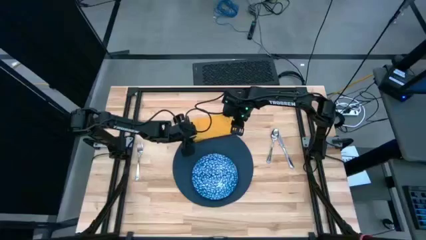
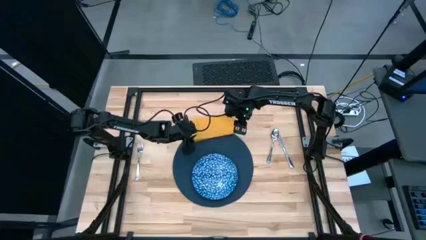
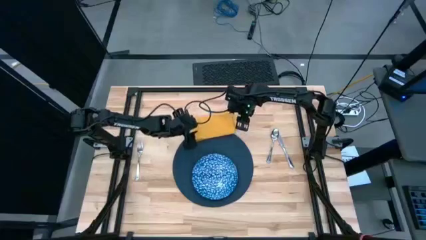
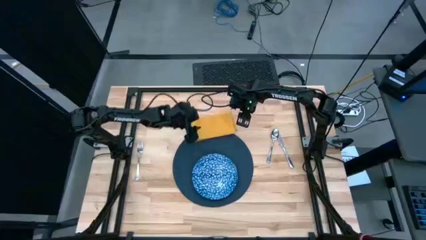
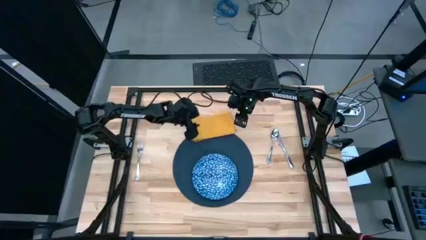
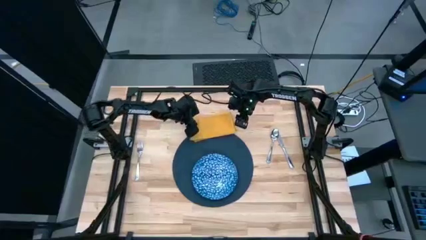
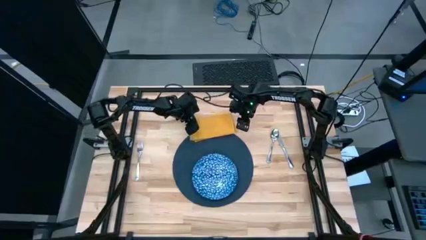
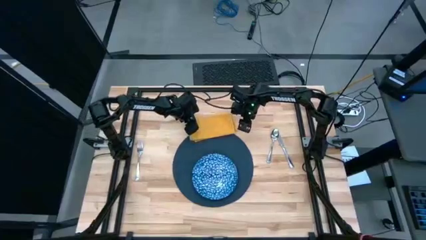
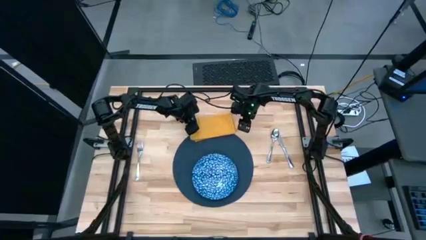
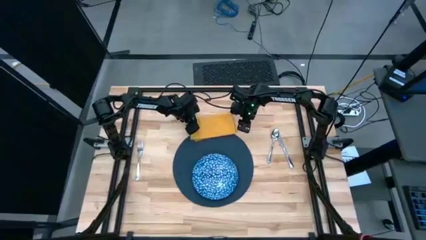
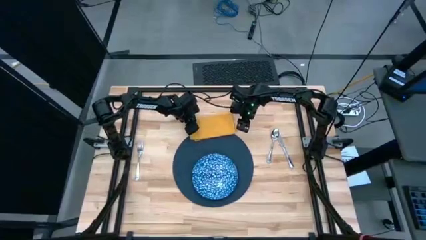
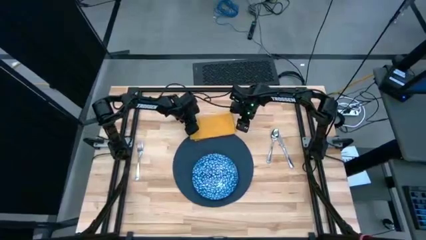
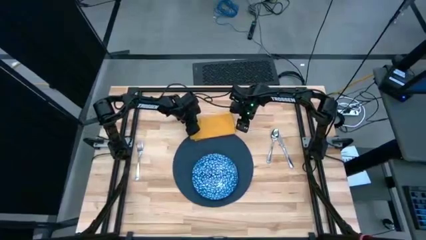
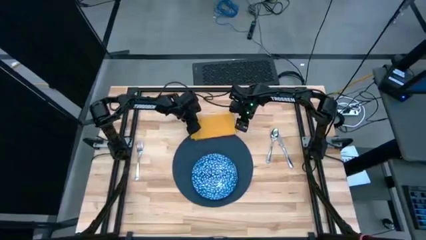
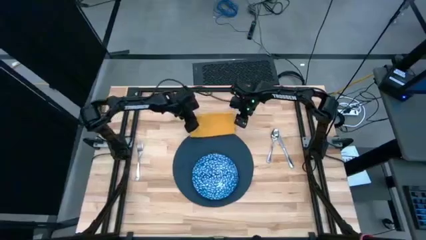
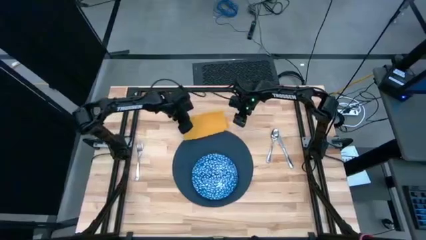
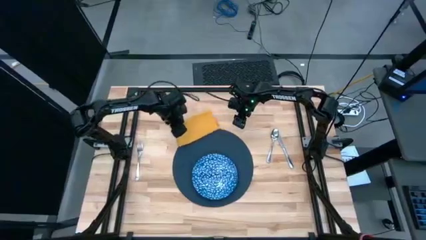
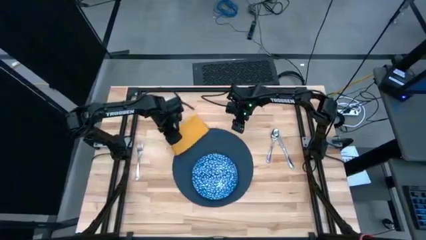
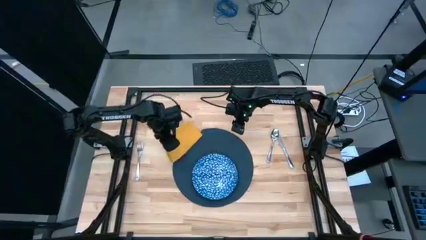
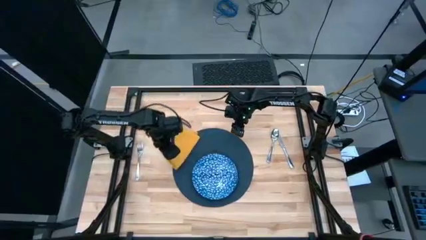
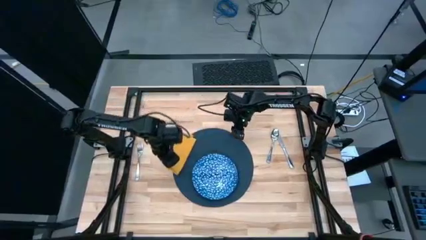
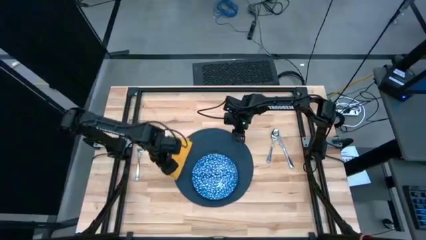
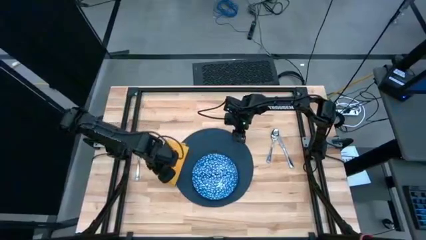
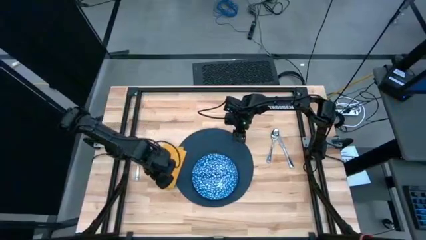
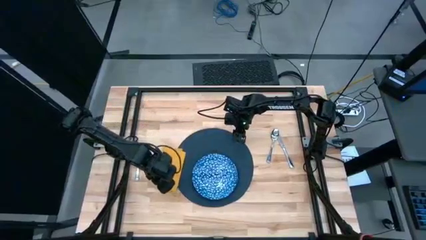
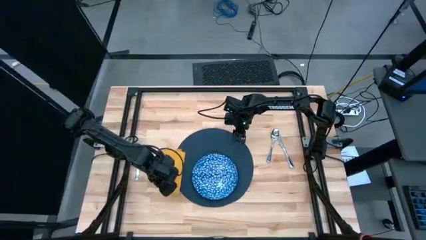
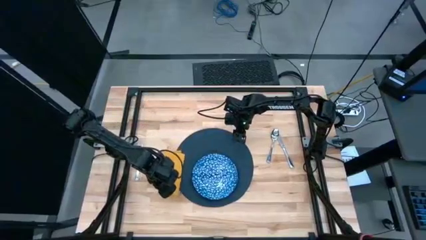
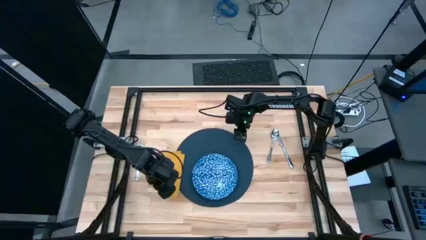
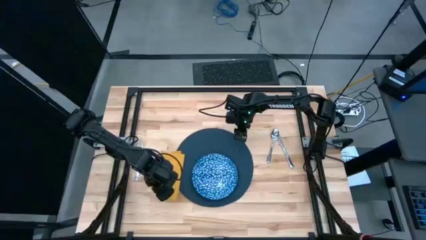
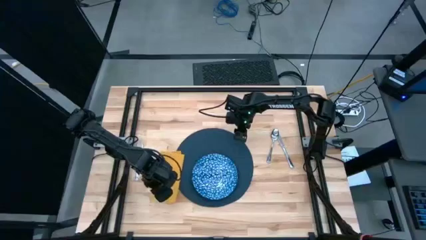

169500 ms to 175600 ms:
Task: Set table place
Put the yellow table napkin on the left of the blue plate

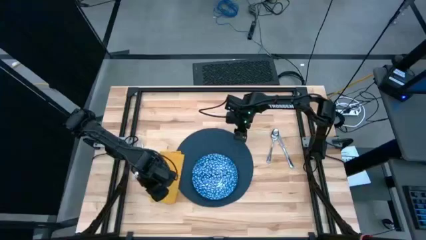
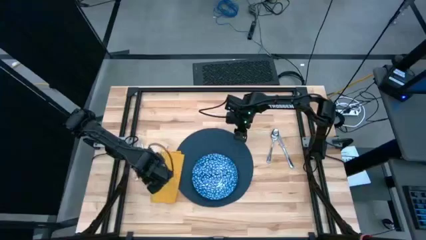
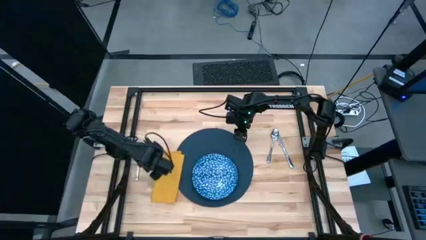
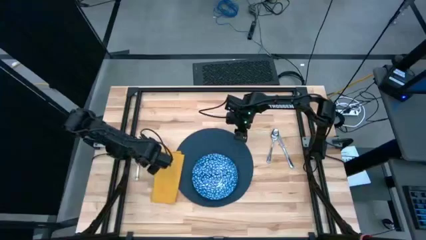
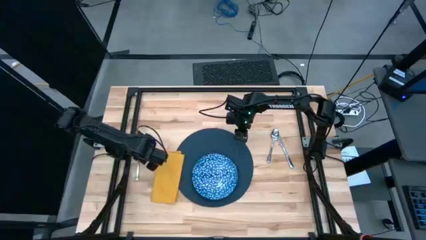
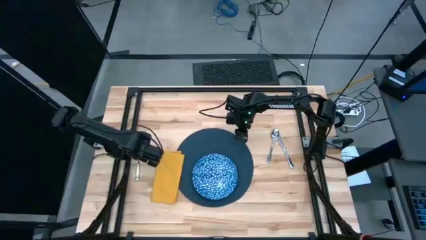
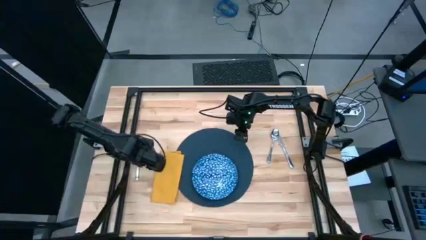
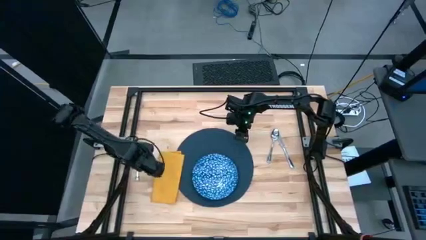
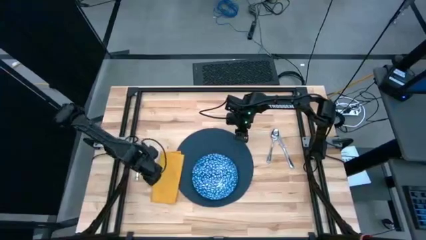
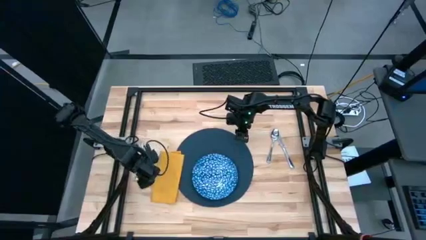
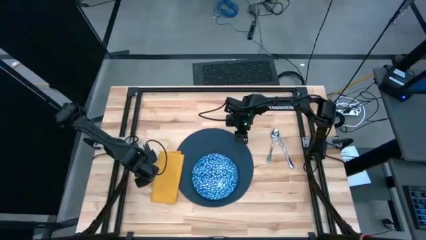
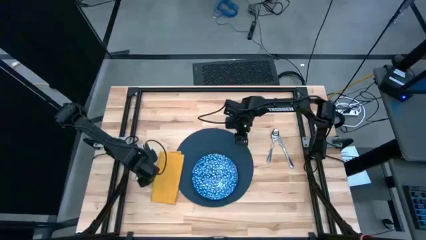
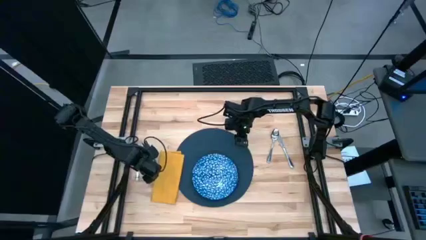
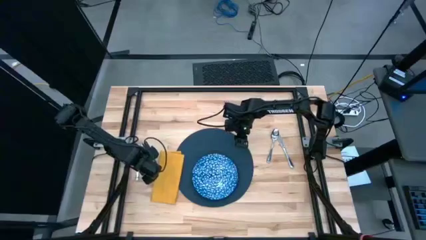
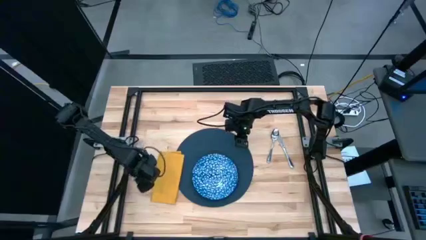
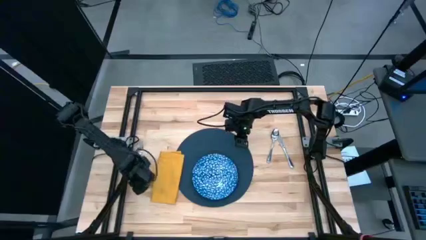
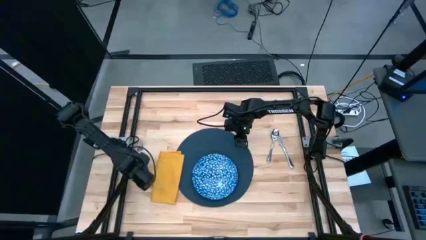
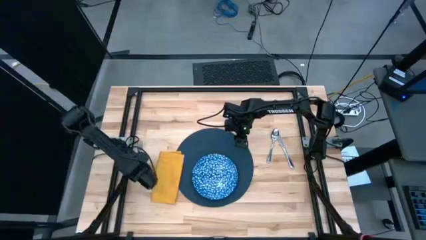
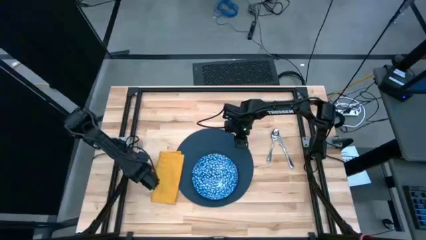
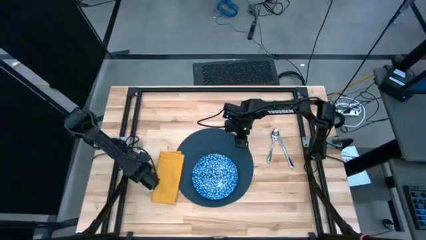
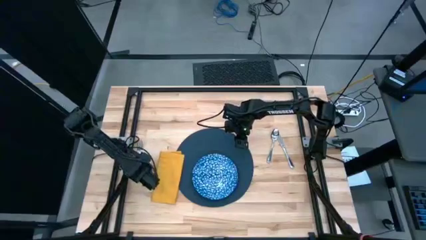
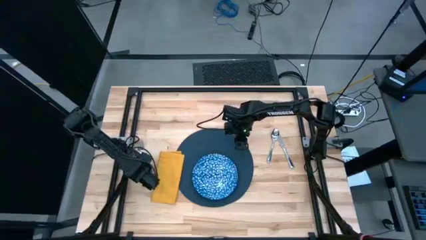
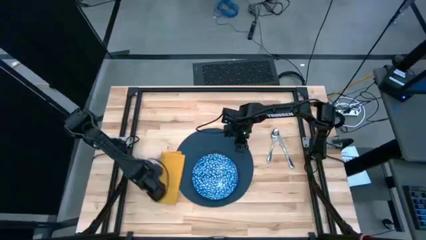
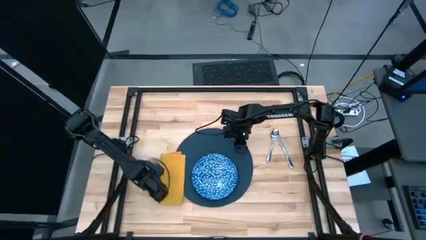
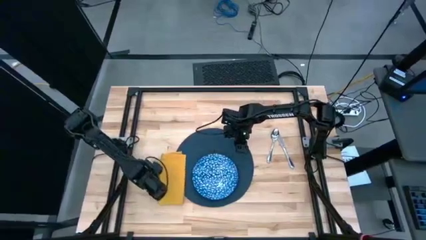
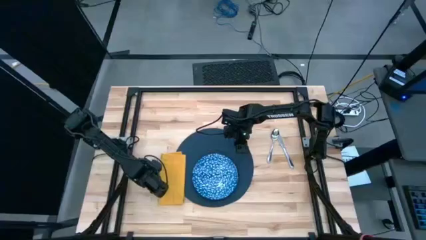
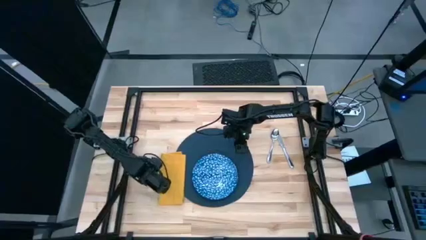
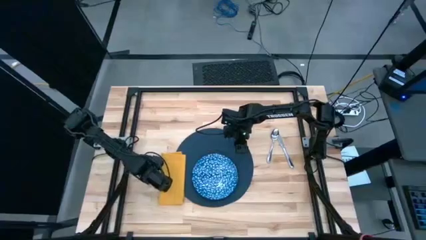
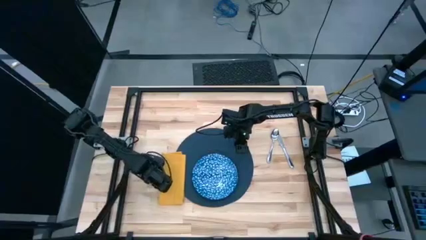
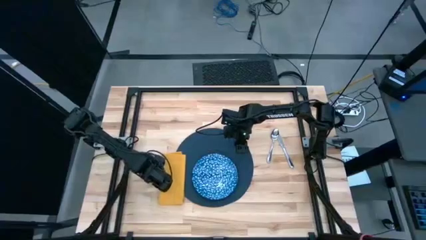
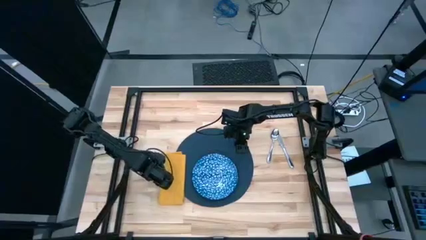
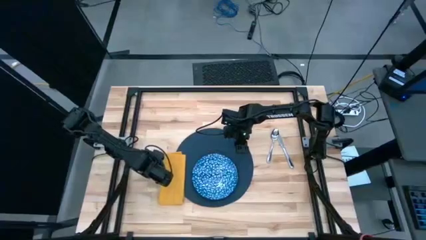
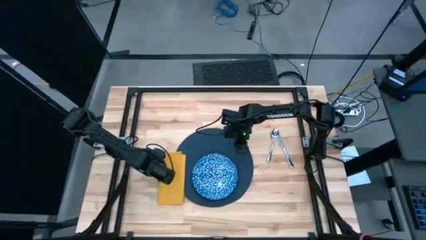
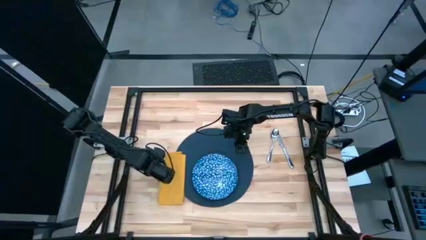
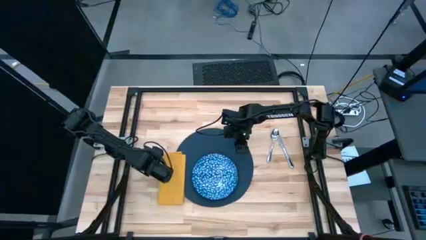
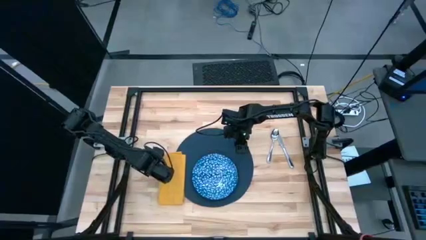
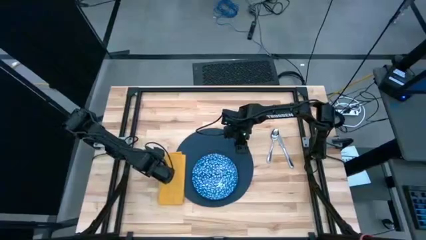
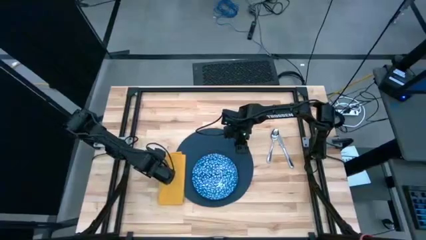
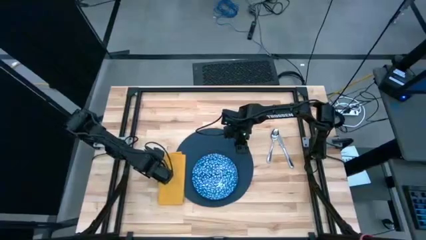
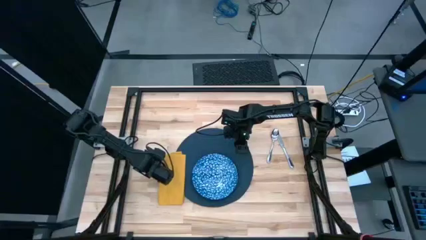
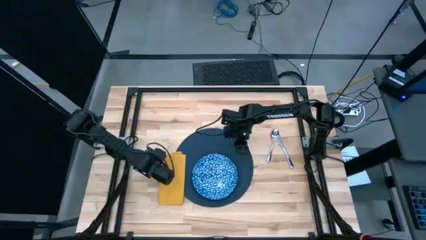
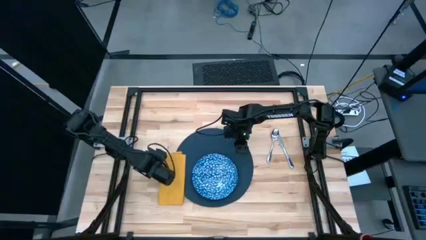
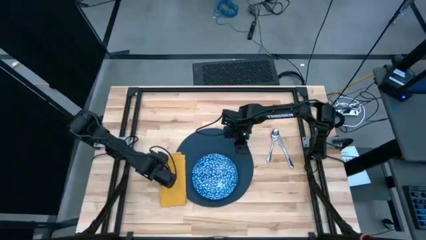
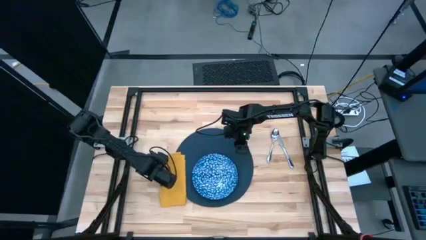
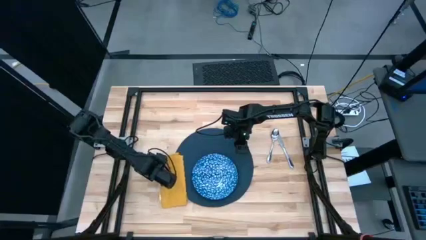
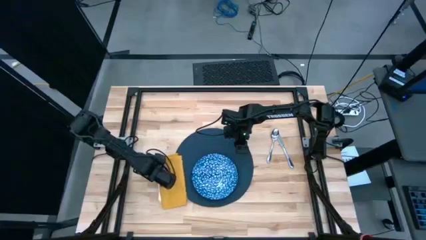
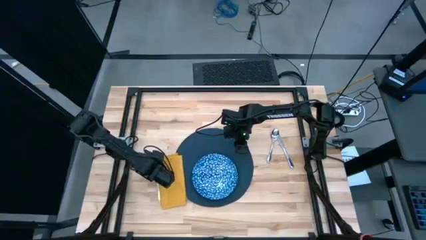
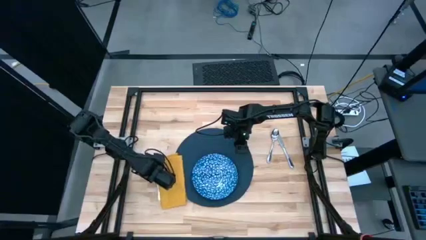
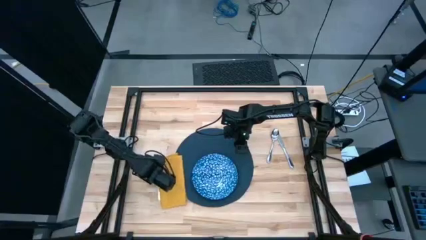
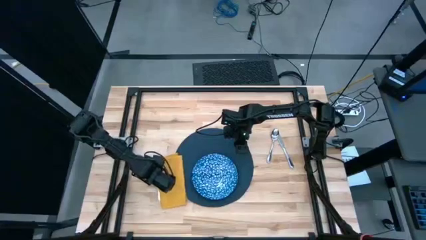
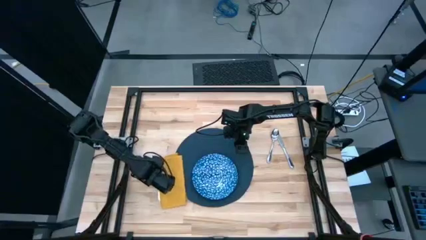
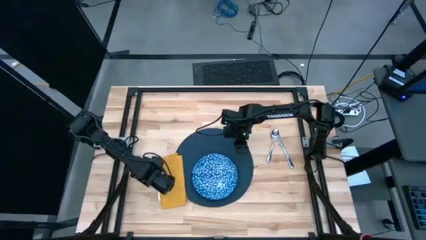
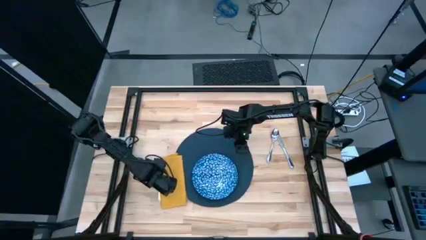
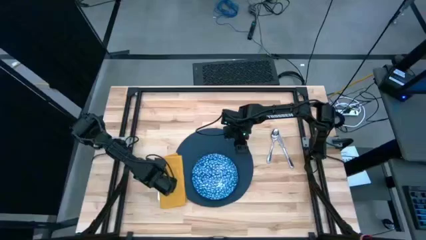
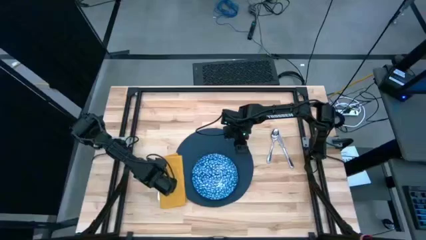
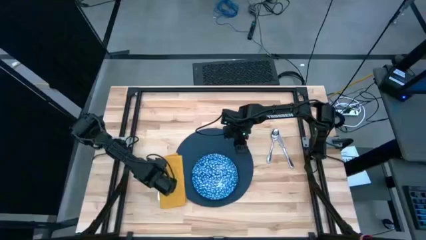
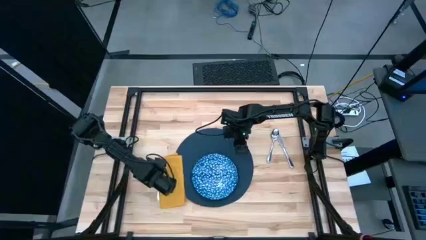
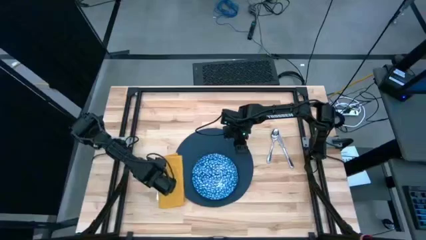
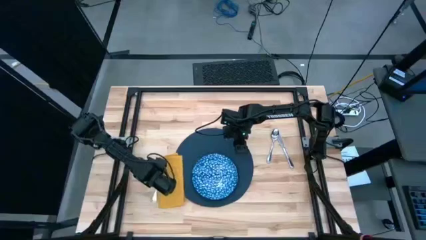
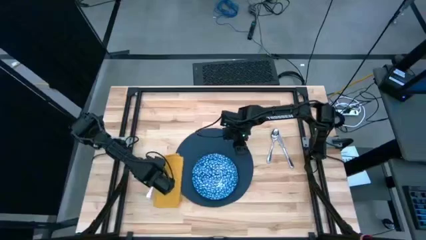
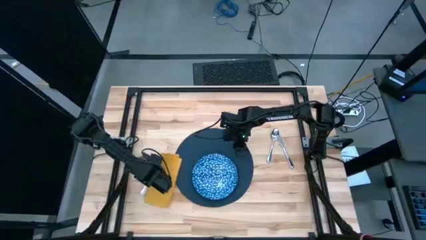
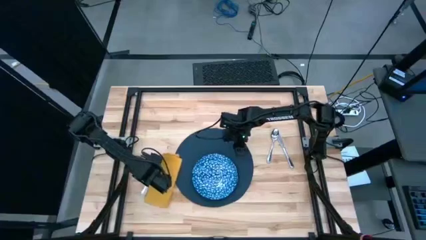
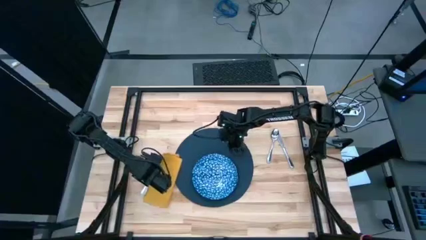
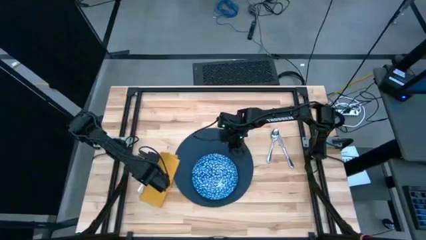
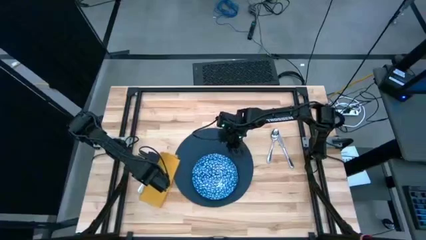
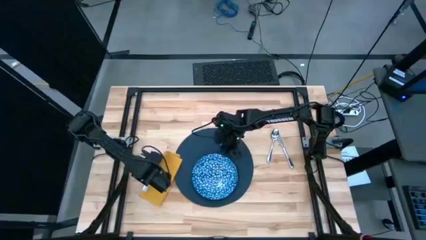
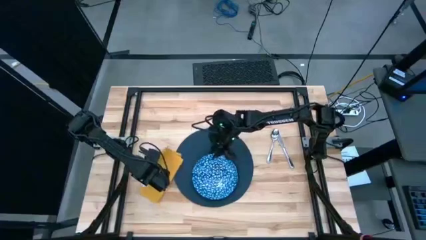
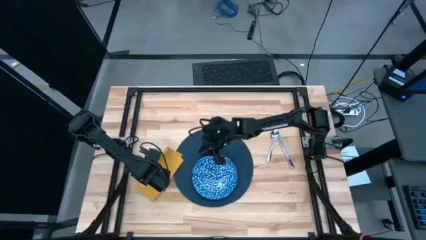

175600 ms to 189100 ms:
Put the fork on the yellow table napkin
